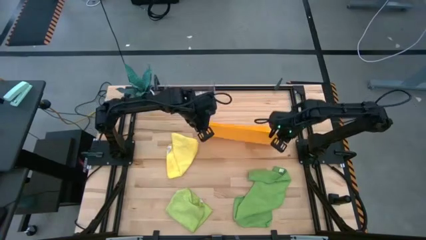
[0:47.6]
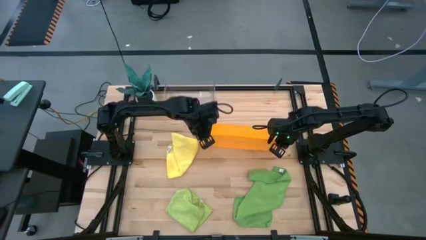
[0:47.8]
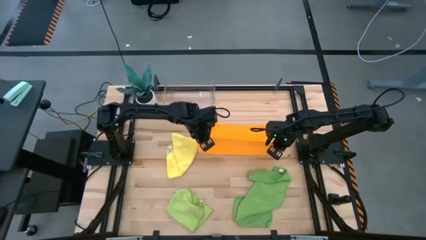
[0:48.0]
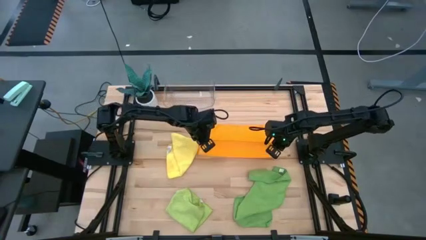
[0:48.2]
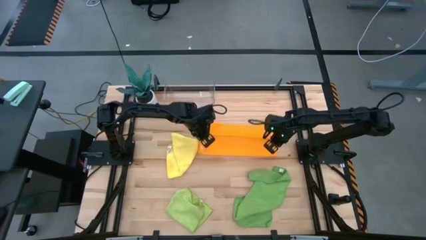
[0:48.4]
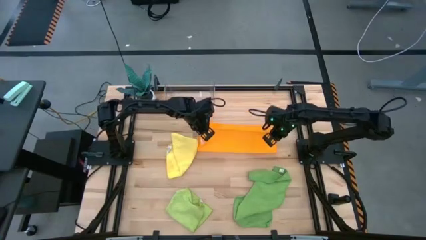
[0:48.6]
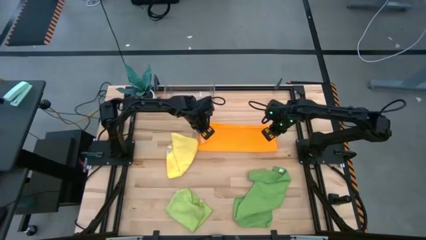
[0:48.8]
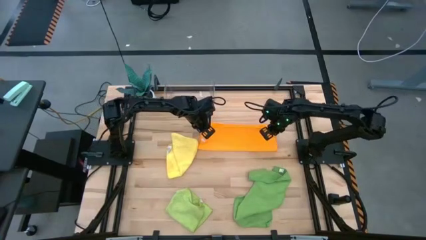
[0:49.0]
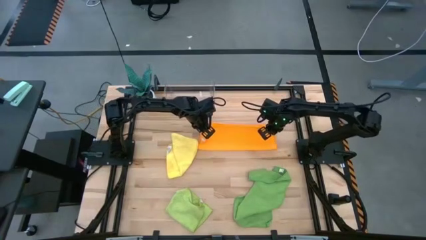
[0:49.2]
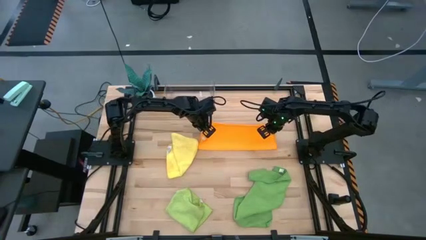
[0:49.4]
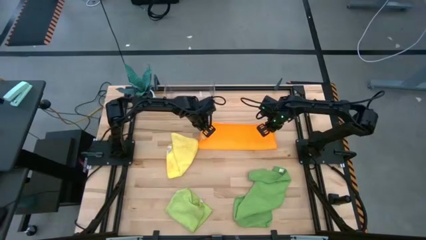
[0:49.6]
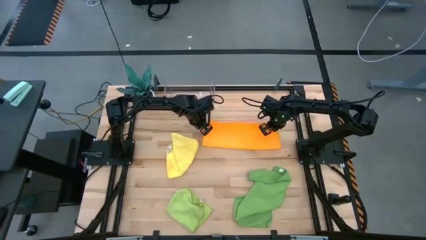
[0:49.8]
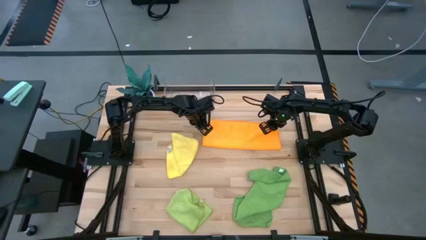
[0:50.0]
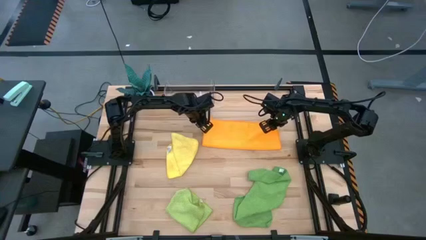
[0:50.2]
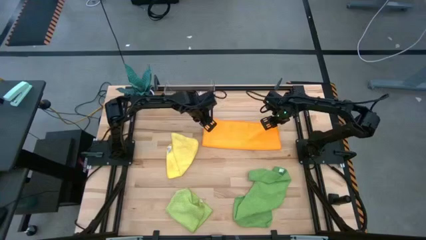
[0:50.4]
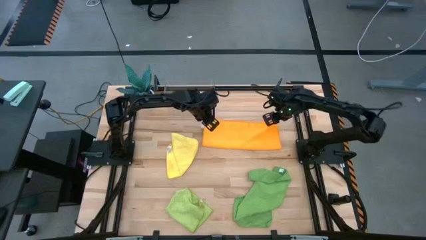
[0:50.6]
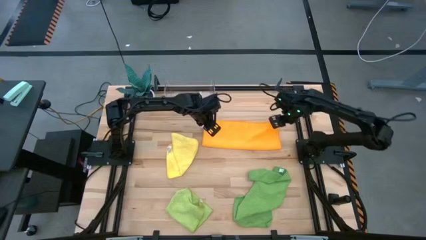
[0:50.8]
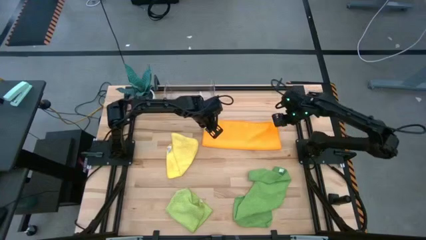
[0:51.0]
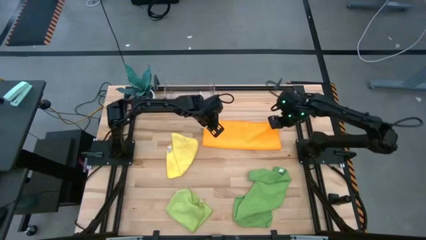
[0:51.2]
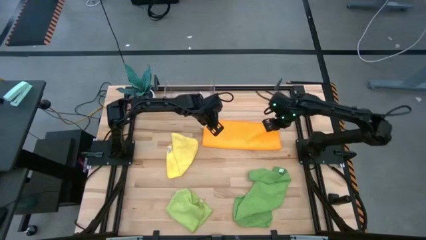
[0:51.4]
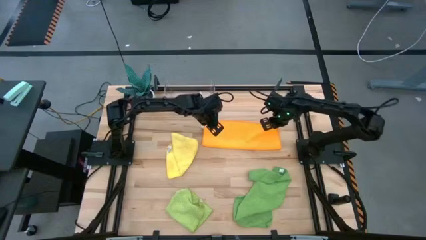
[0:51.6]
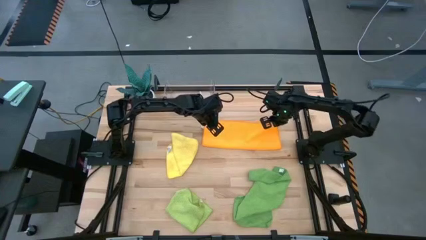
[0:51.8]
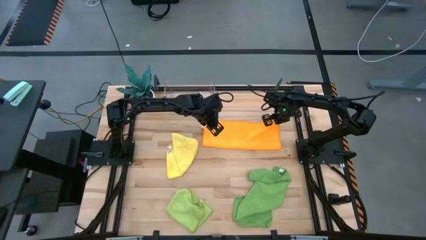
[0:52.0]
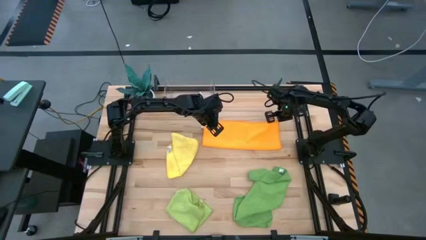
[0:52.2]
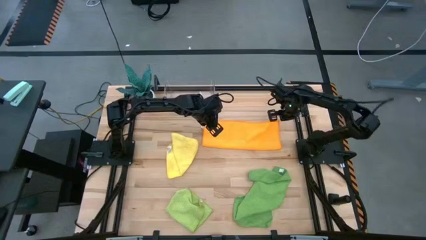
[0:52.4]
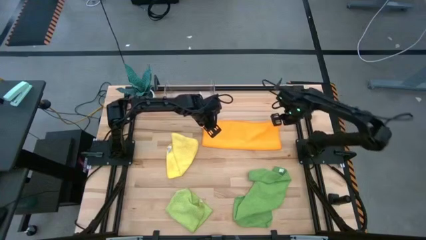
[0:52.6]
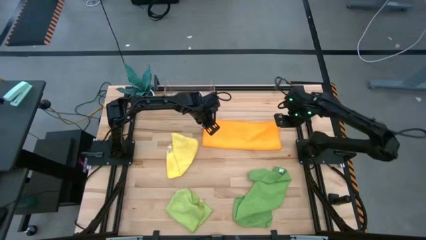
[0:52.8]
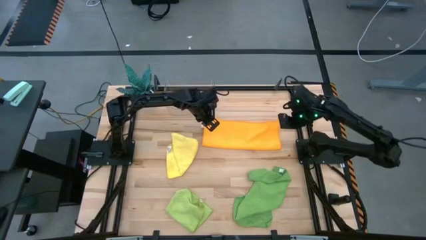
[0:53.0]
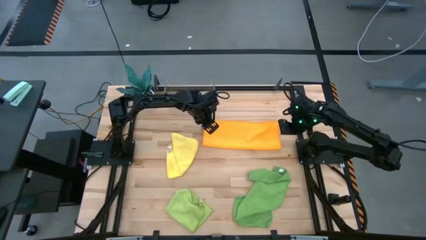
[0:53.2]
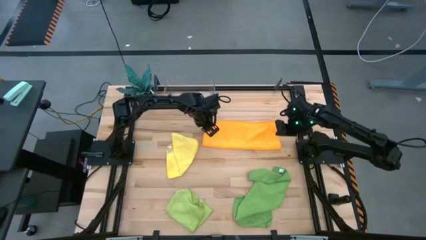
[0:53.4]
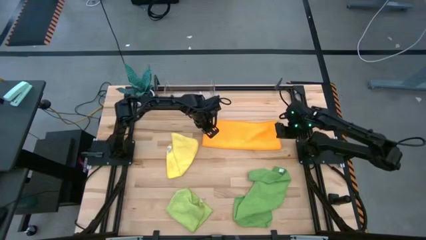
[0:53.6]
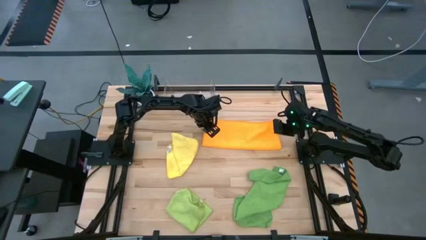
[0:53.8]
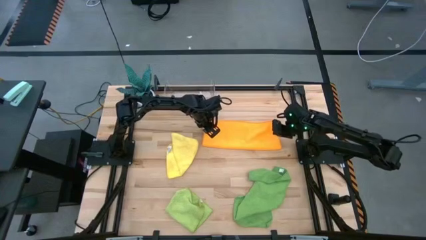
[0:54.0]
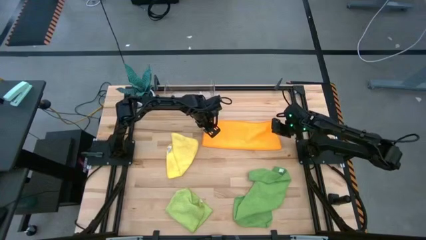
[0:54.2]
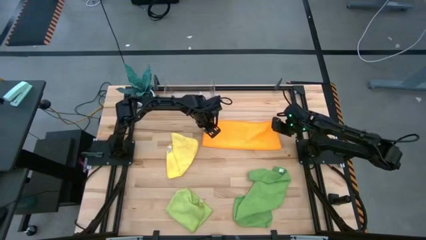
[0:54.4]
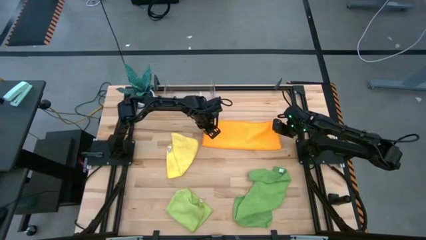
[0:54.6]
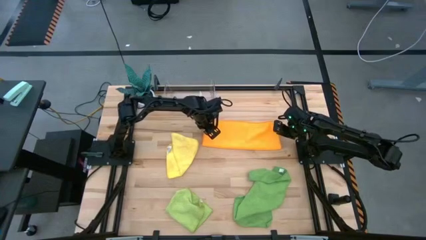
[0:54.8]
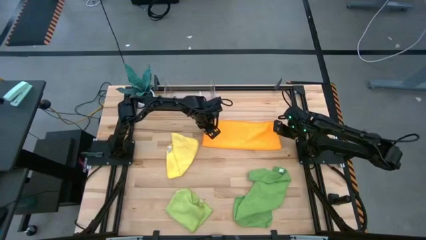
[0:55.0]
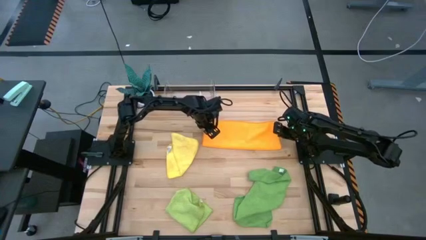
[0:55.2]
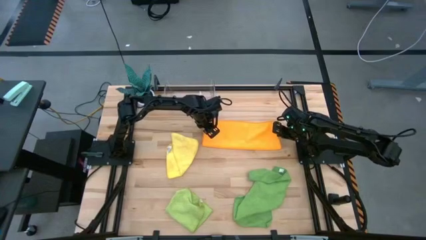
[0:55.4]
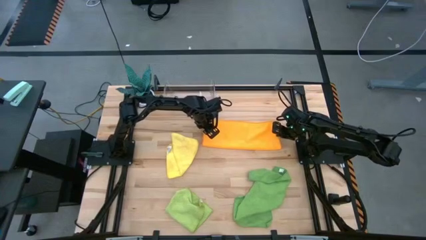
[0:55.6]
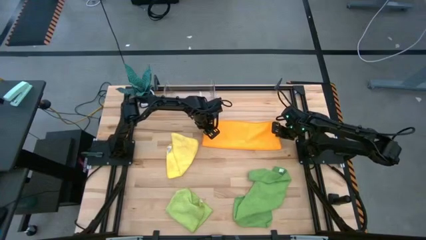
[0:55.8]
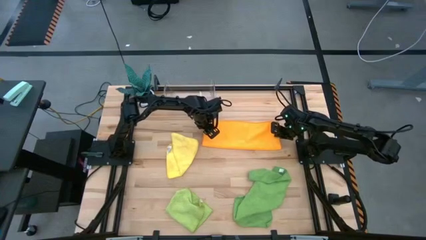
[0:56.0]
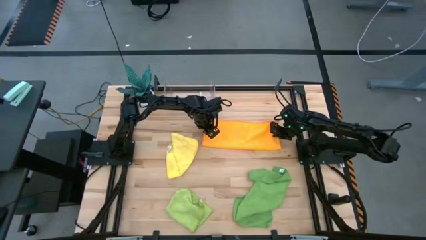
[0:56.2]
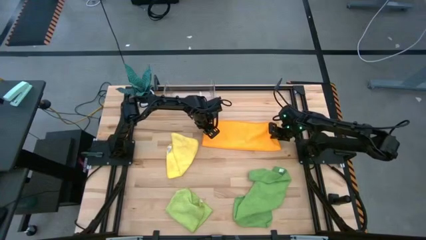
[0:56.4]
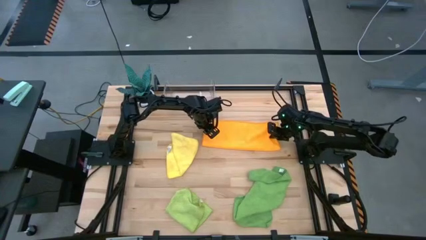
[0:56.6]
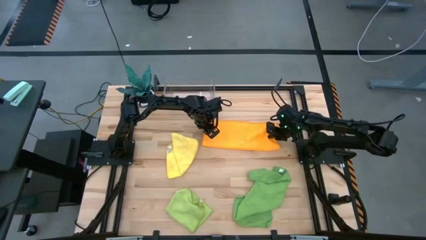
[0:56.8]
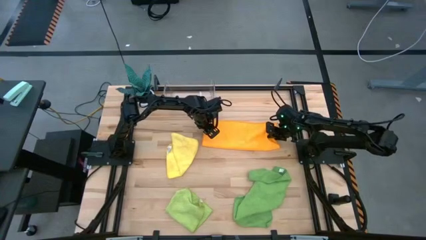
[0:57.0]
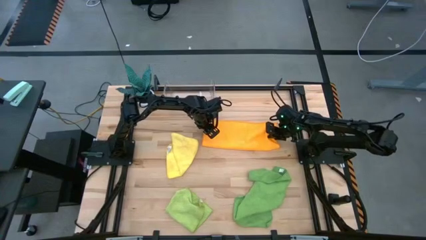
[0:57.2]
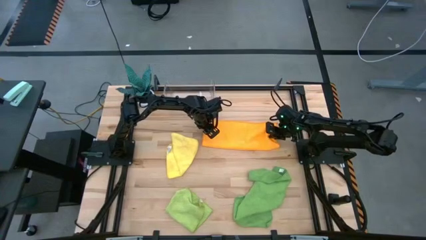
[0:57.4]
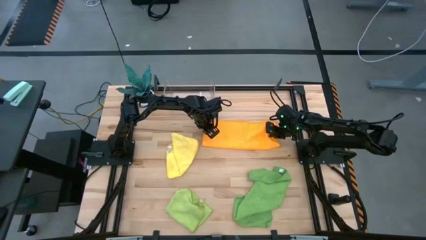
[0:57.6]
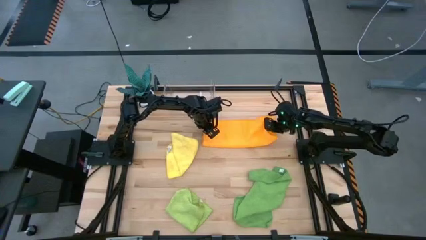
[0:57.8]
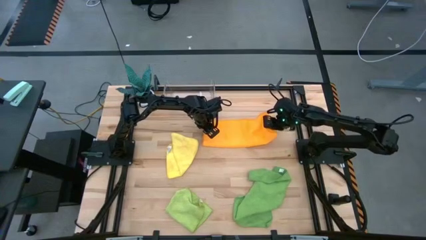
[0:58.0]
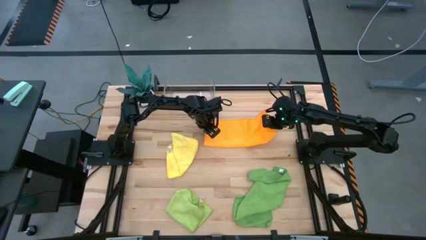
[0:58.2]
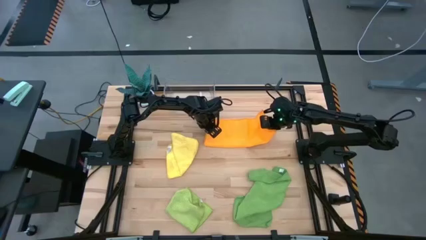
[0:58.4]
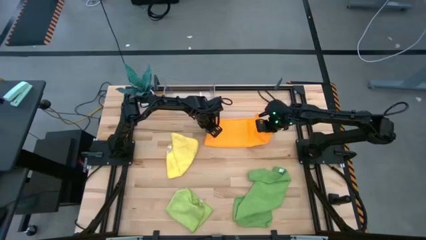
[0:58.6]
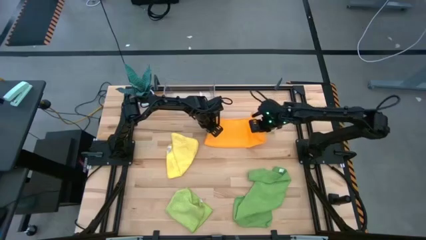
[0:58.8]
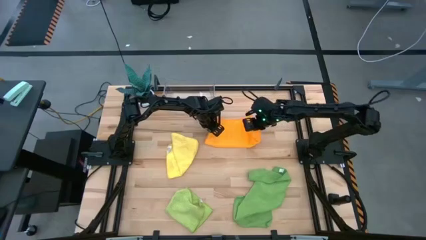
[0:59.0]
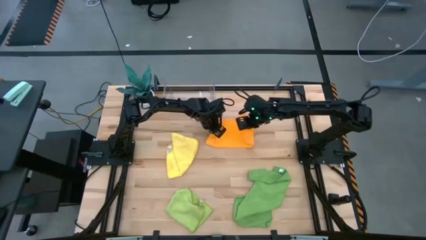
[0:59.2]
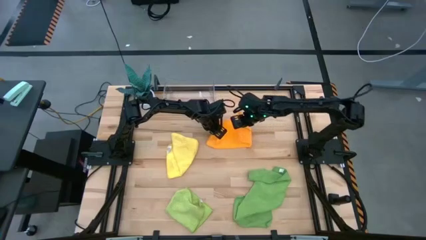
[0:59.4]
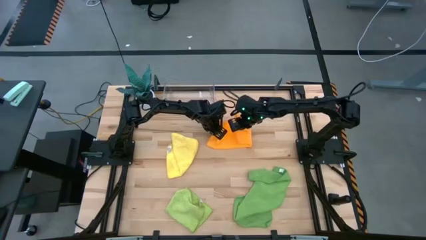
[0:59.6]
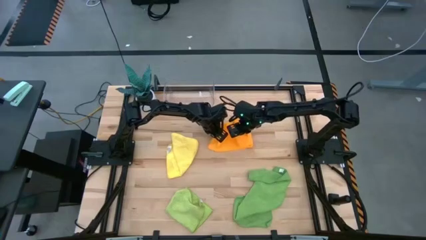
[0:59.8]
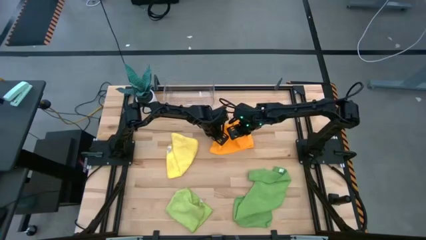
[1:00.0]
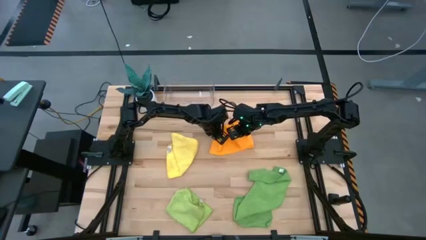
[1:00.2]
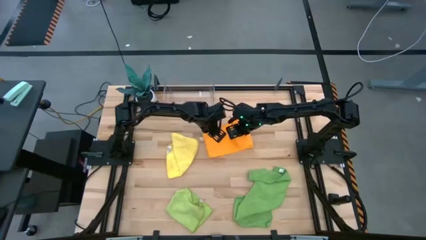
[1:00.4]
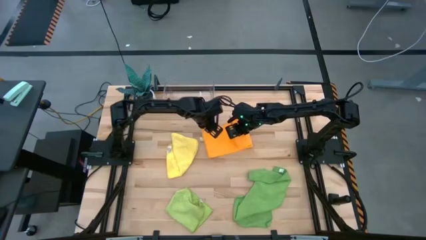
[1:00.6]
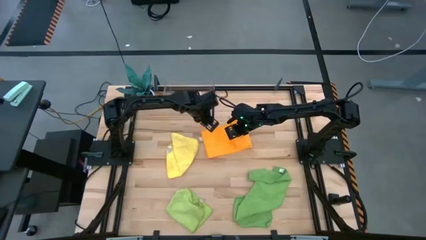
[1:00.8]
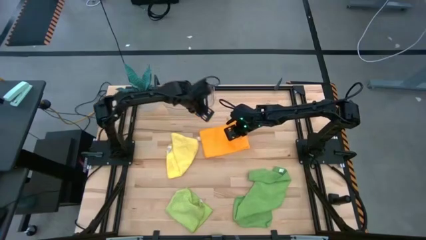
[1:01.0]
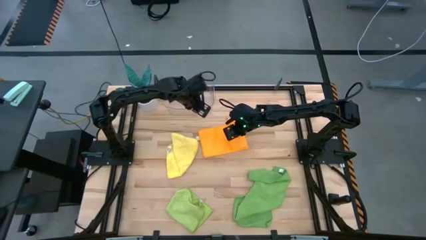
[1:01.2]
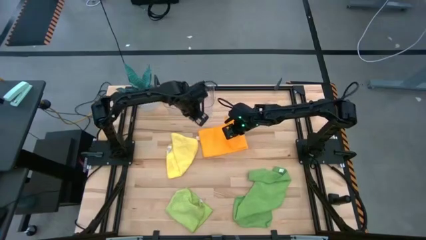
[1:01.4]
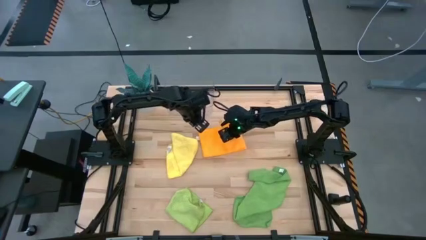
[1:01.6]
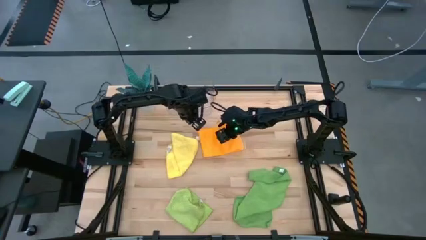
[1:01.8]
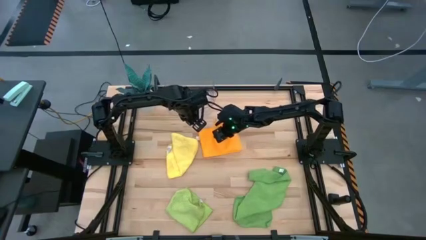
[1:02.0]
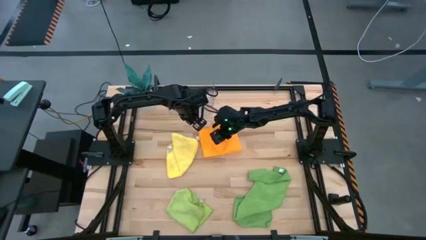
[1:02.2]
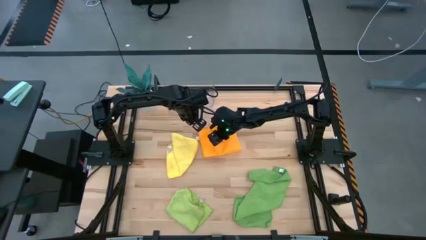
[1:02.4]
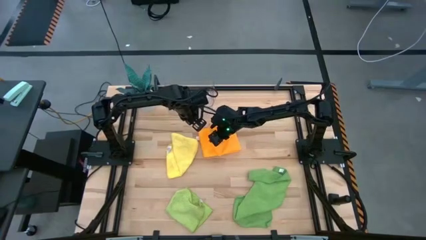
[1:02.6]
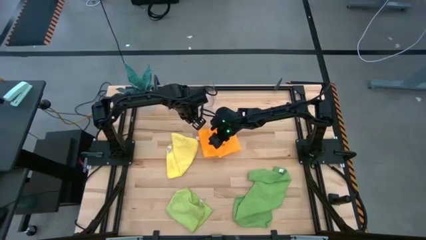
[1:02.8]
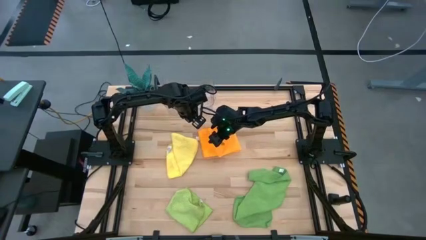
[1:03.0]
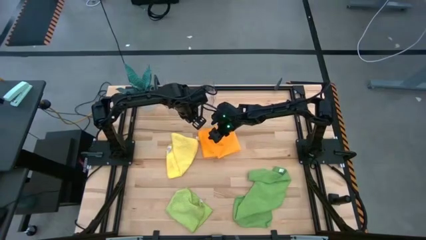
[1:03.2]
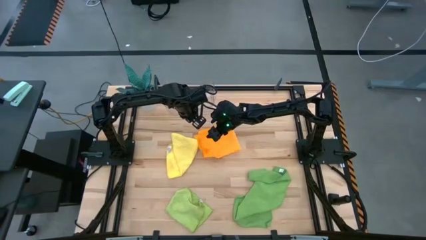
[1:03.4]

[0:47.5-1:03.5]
Task: Fold microfiber towels
Fold the orange towel
